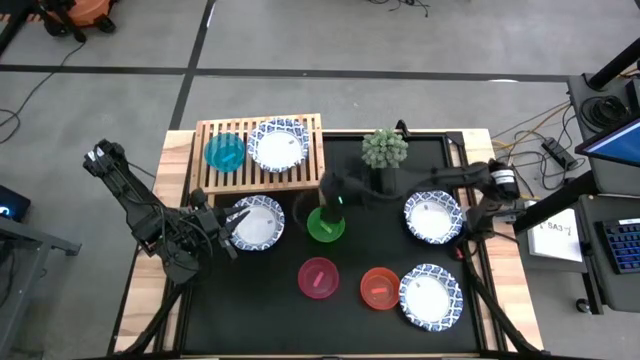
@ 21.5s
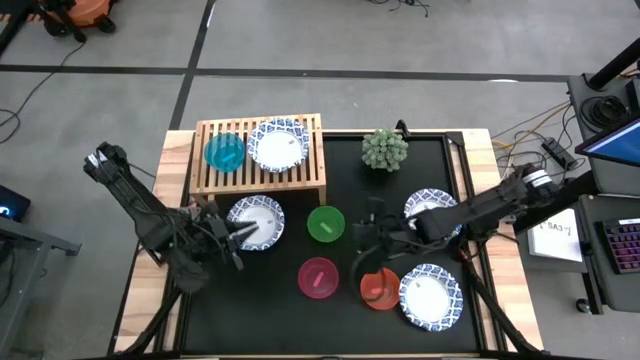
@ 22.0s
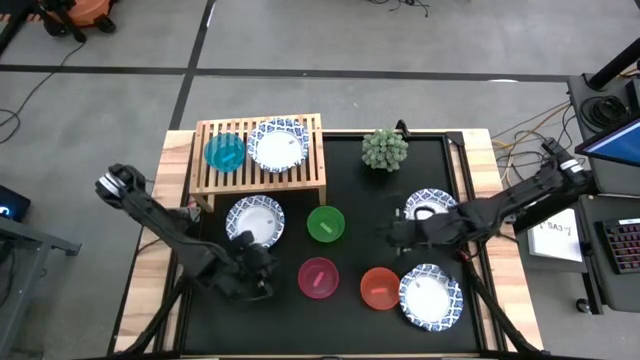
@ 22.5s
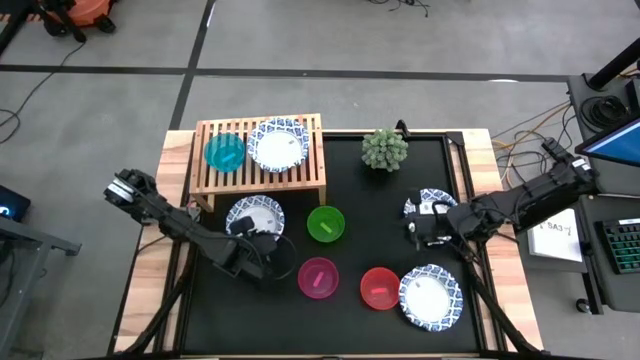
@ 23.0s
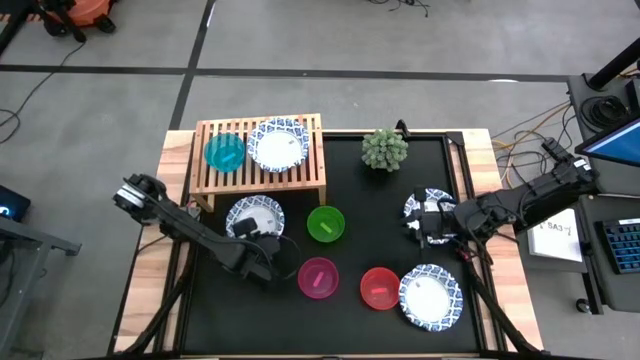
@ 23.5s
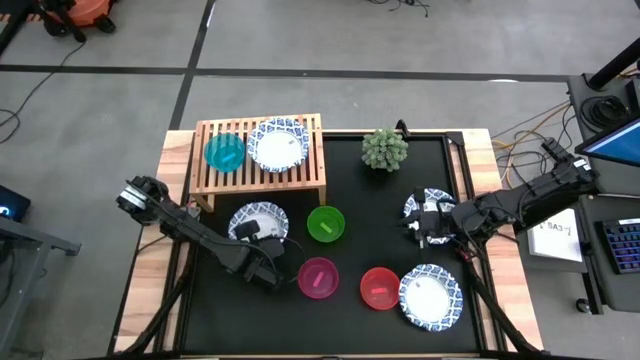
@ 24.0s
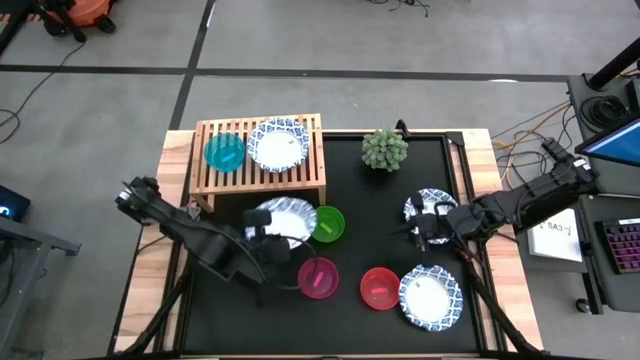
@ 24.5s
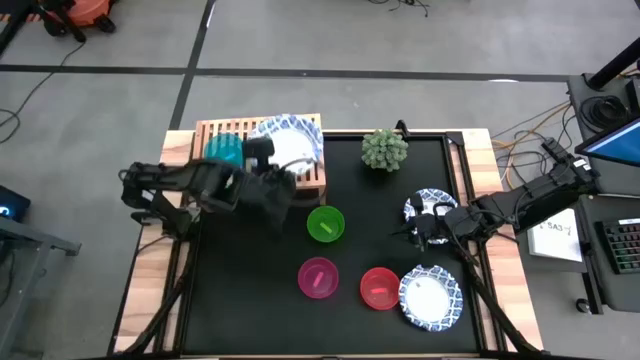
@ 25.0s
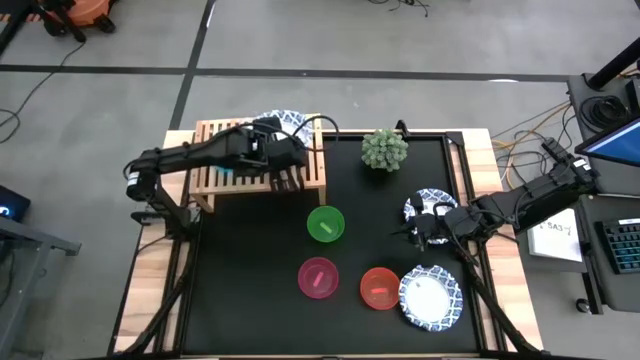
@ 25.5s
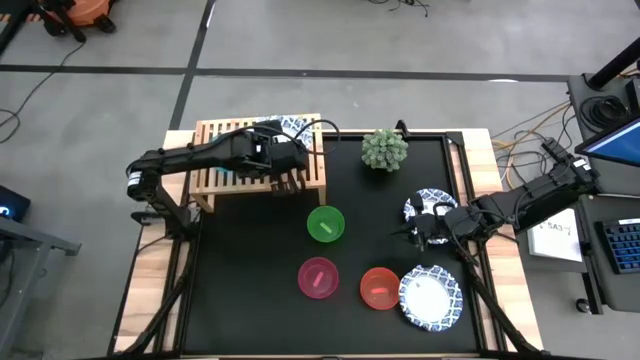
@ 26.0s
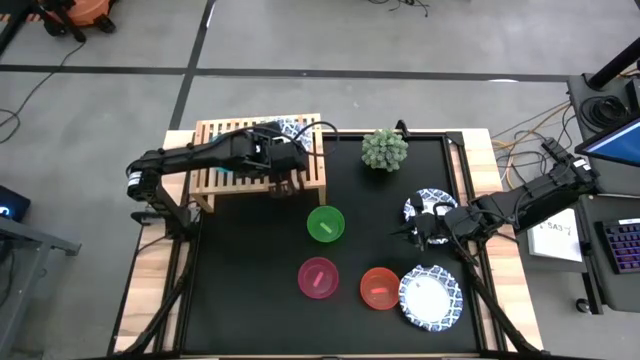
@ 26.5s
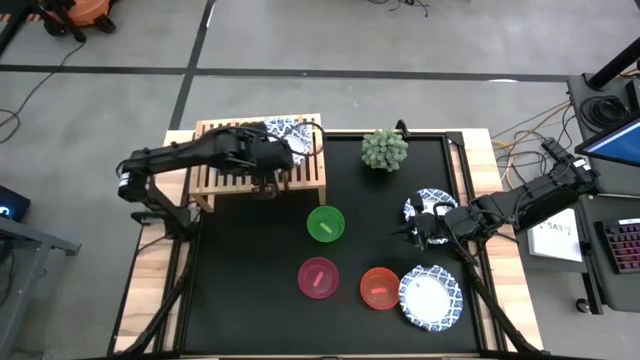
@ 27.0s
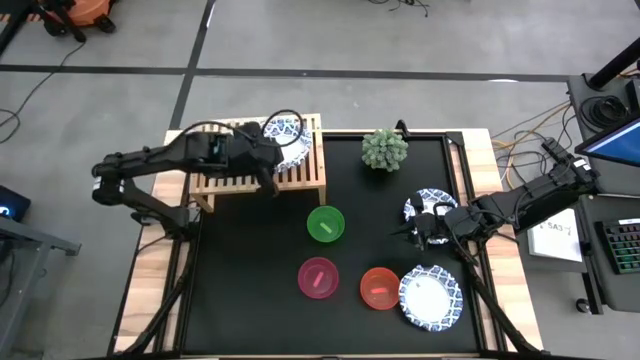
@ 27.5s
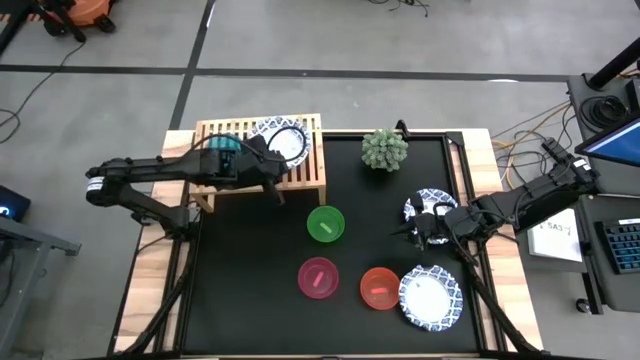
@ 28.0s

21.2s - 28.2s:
Task: Place and stack bowls onto a shelf
Stack the white bowl on top of the other white patterned bowl

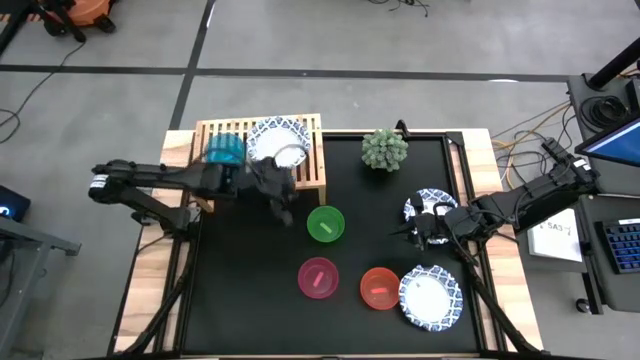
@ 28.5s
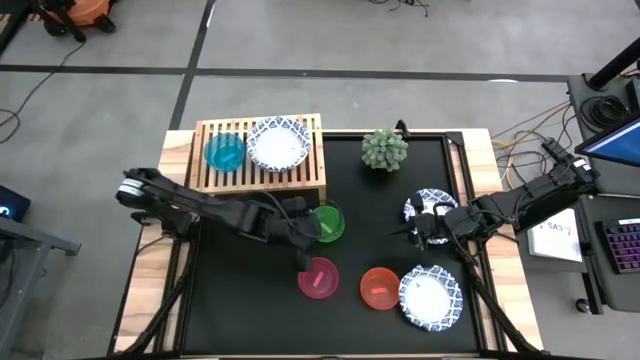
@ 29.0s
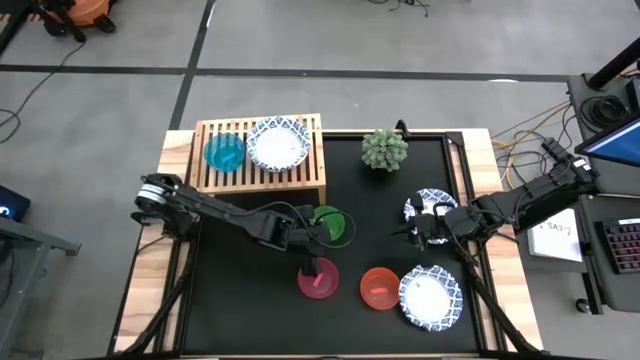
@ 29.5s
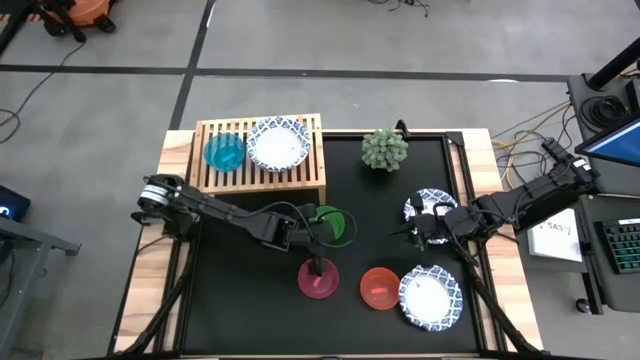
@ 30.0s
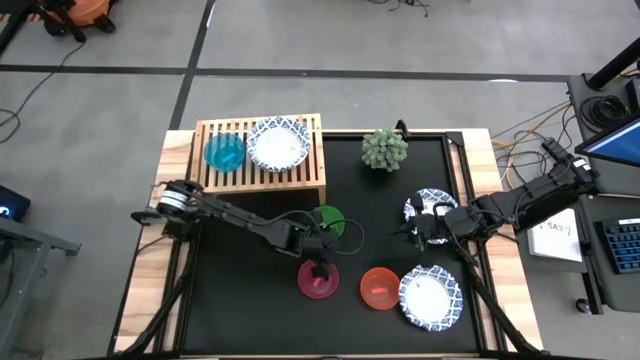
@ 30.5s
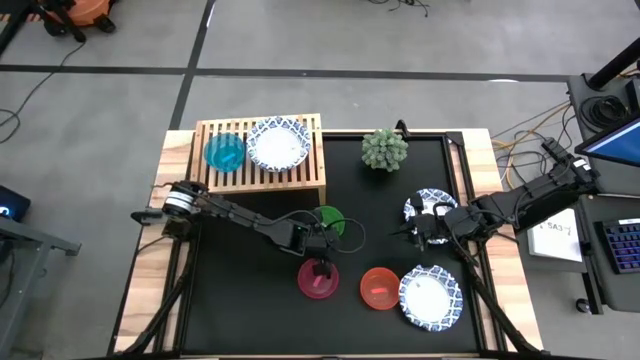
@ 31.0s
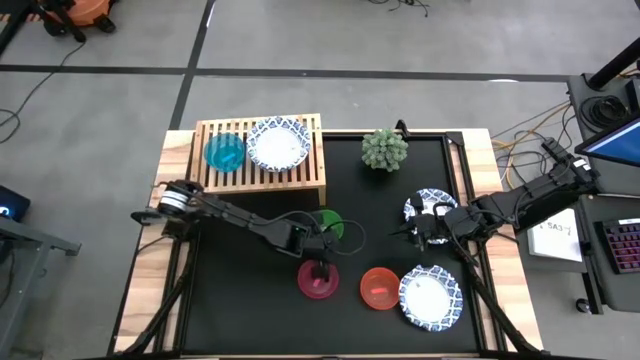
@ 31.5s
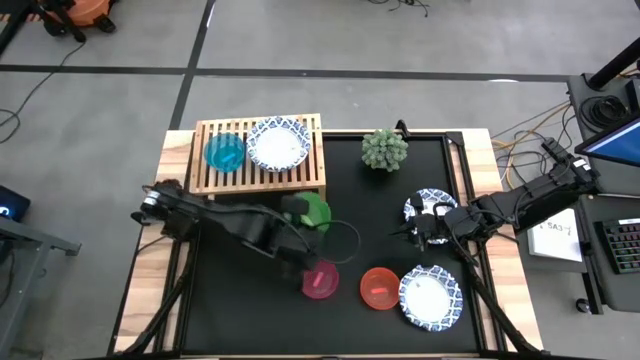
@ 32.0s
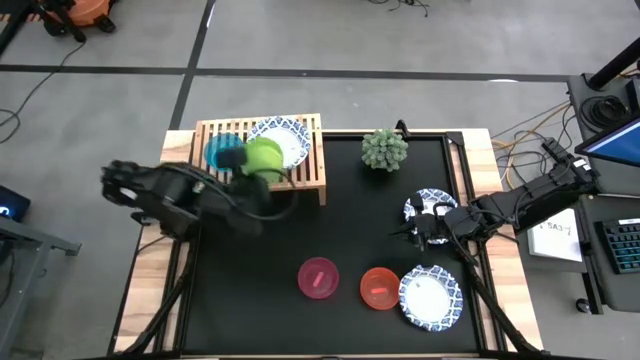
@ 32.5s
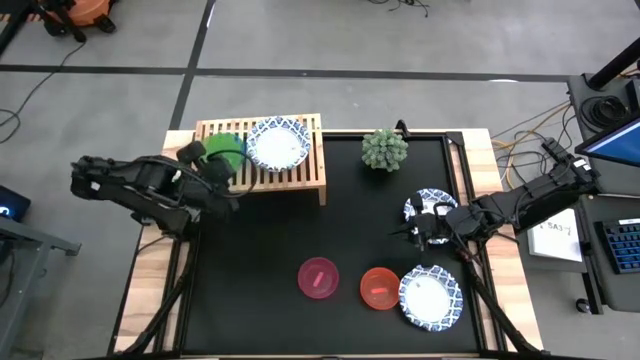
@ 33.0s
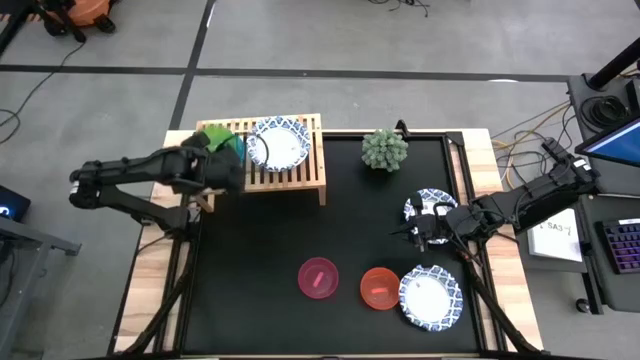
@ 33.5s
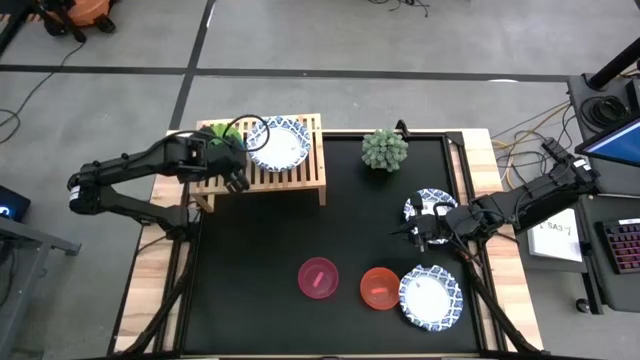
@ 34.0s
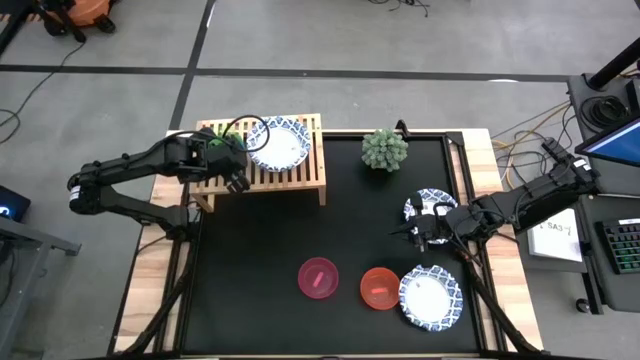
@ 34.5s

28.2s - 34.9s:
Stack the green bowl on top of the blue bowl

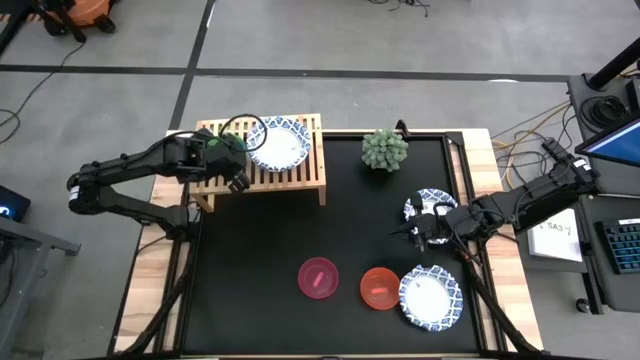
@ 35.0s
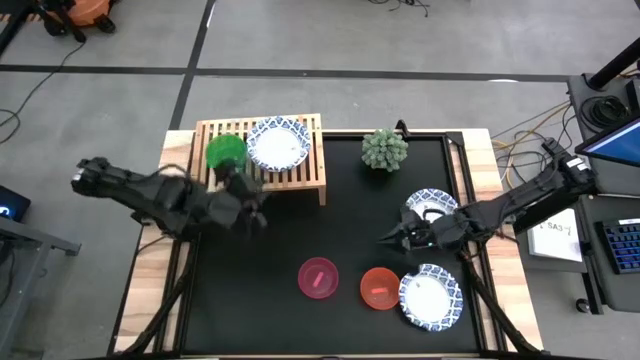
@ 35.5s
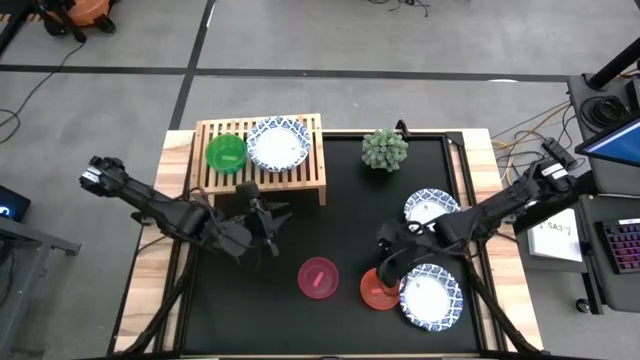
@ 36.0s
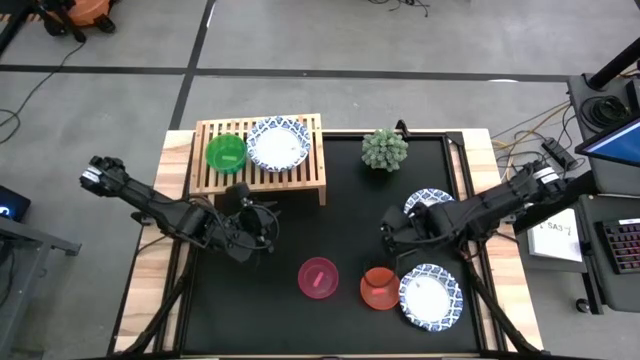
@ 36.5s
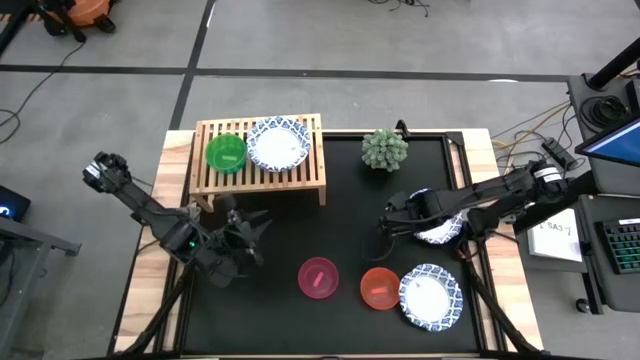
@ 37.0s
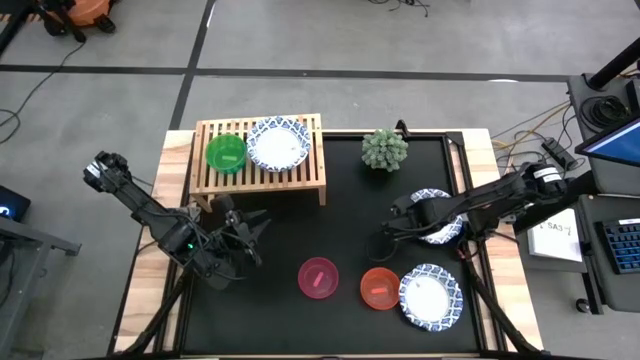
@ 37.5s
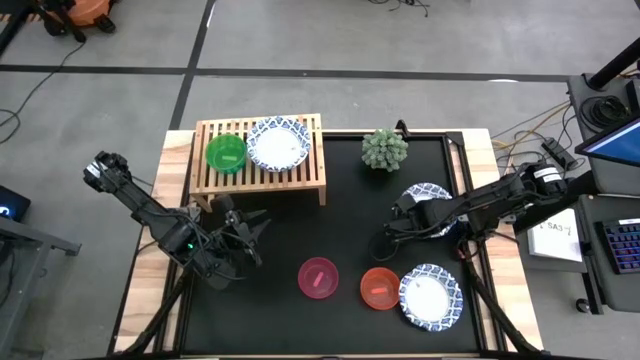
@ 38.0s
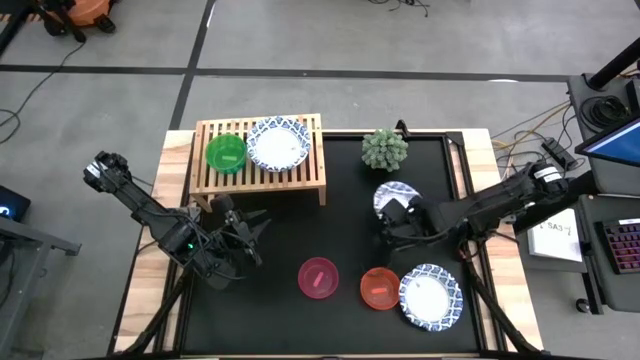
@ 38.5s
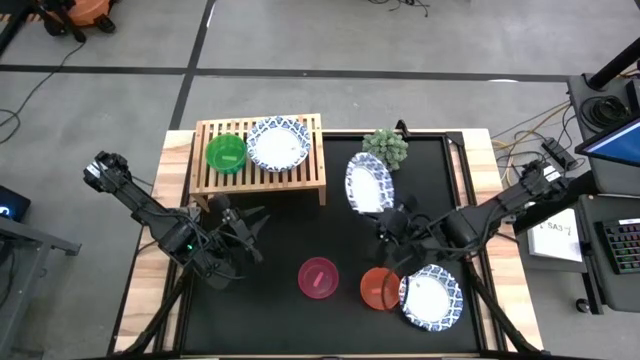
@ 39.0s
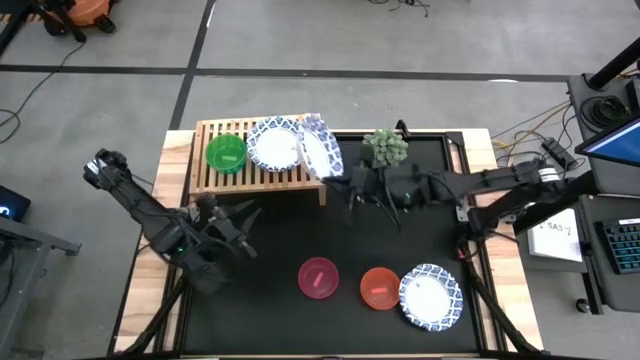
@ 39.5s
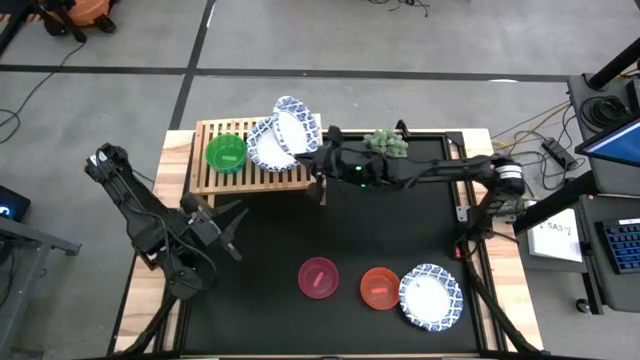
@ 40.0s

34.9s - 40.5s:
Stack the white bowl on top of the other white patterned bowls

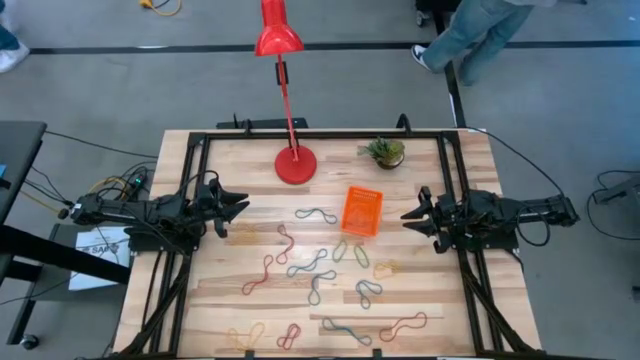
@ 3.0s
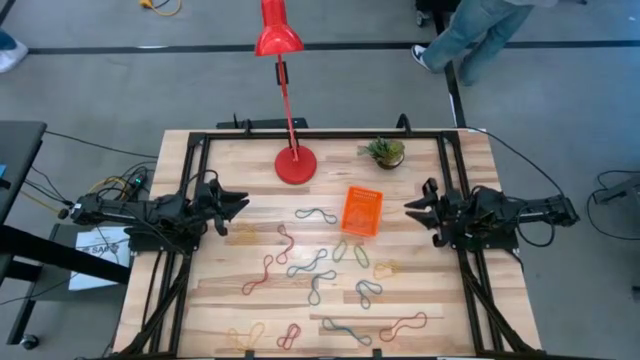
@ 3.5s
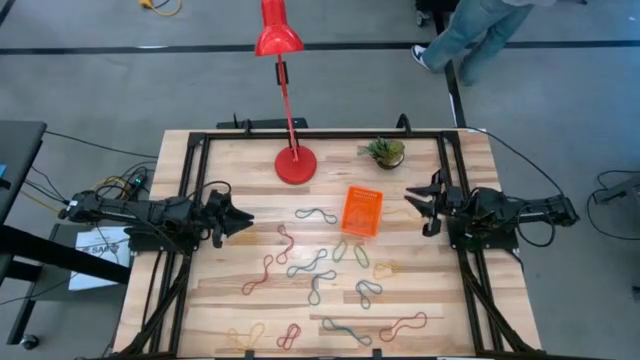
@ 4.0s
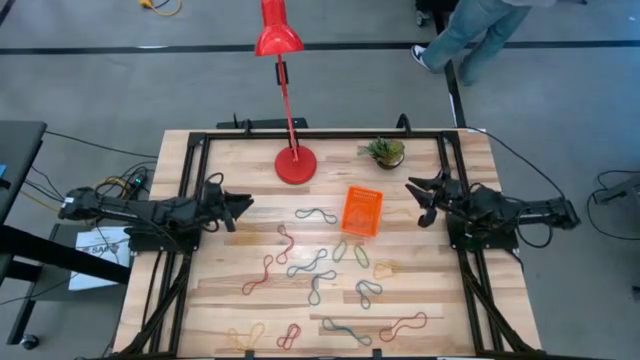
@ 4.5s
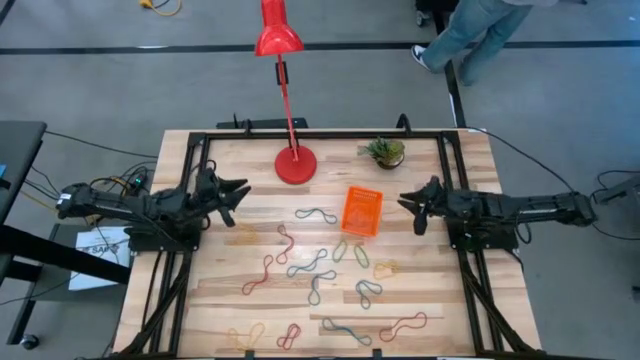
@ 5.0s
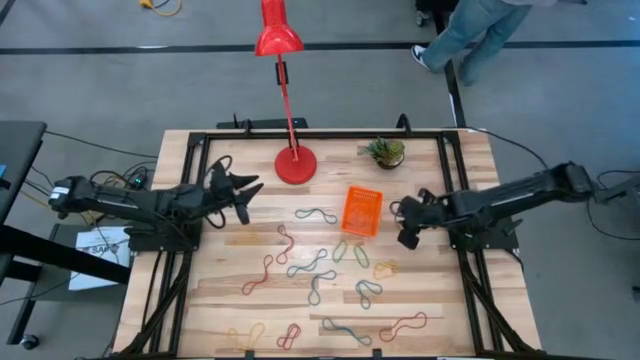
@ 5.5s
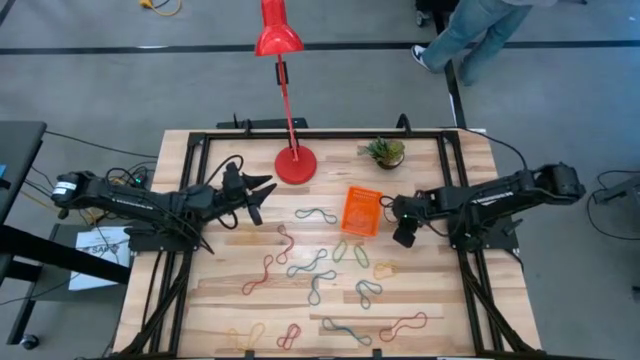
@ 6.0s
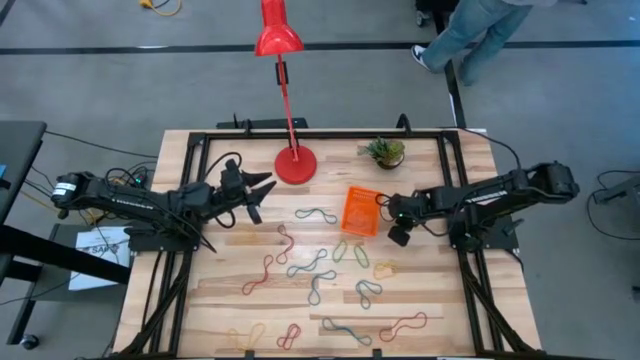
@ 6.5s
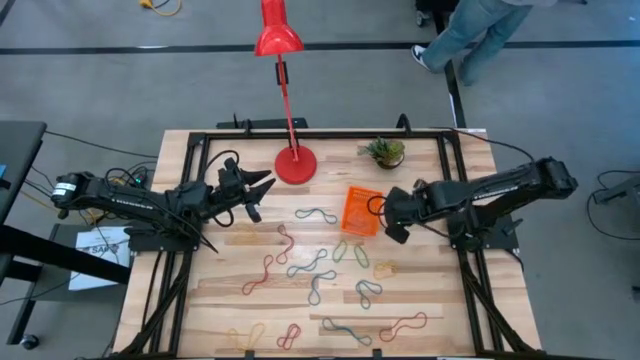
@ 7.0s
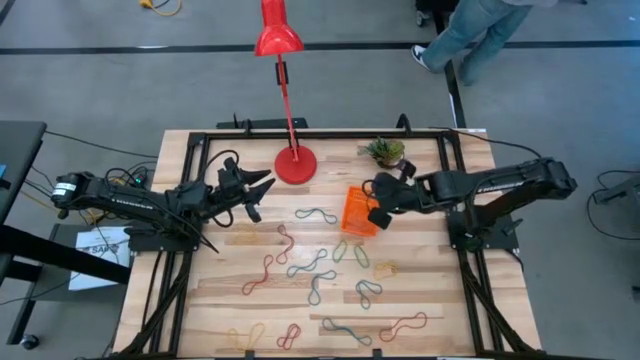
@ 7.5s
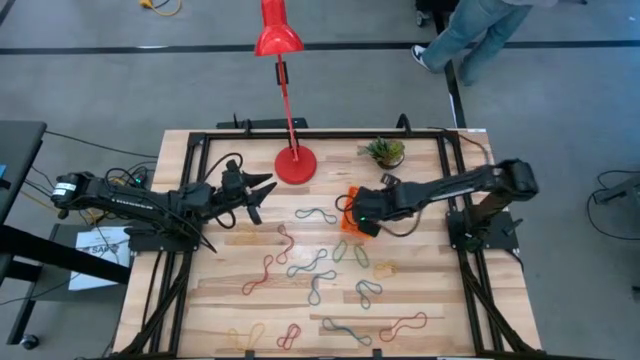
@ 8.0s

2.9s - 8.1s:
Task: Pick and place items into bin
Put the top right yellow rubberband into the orange basket
